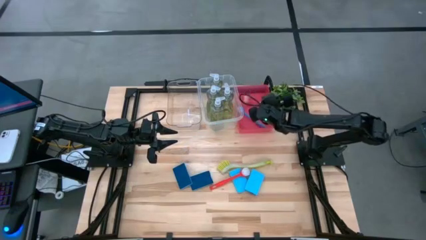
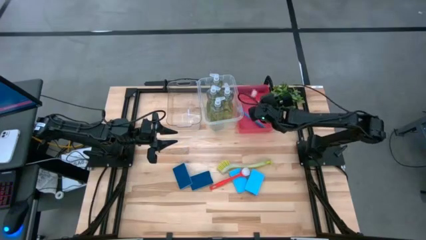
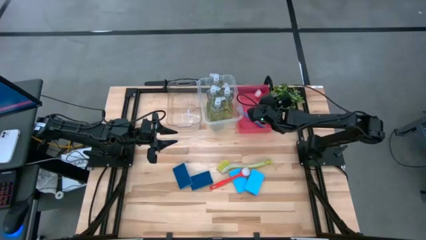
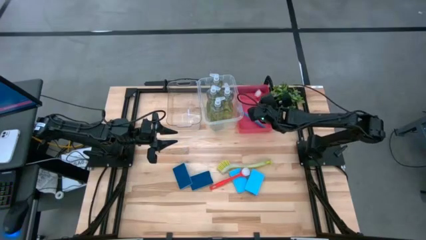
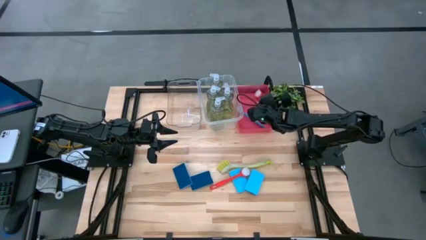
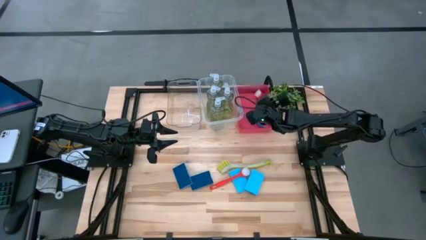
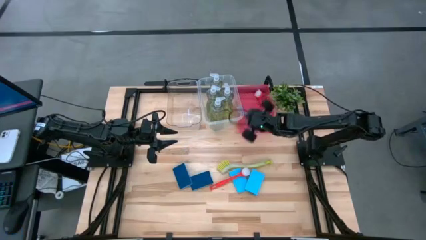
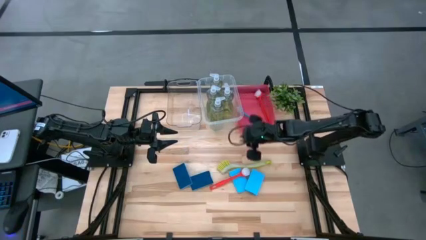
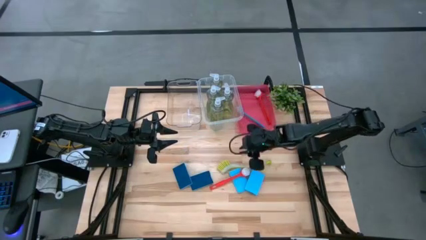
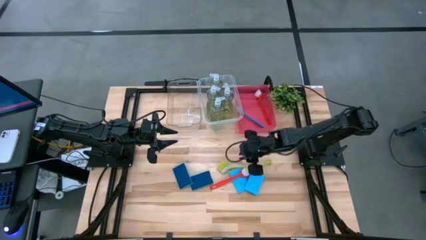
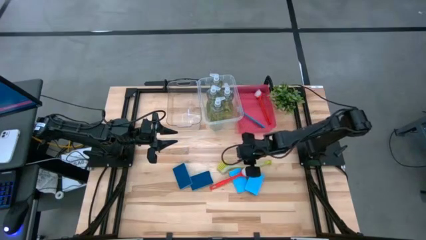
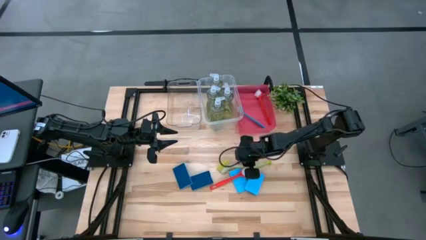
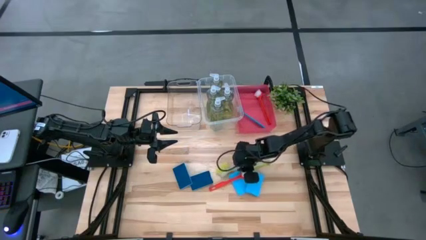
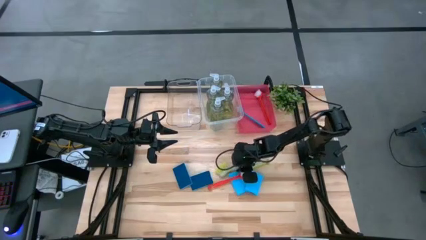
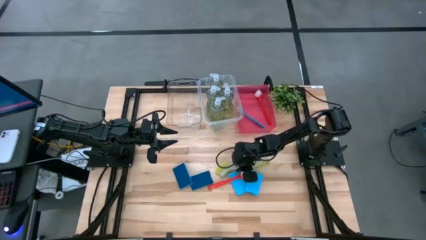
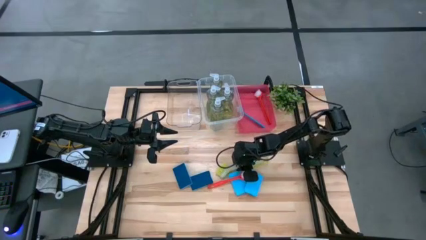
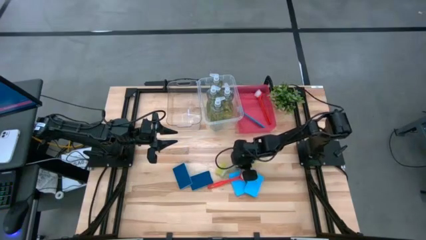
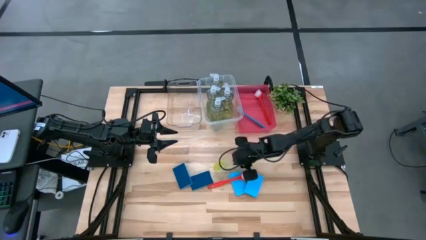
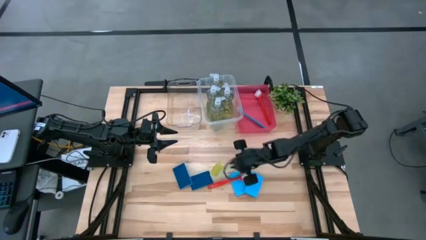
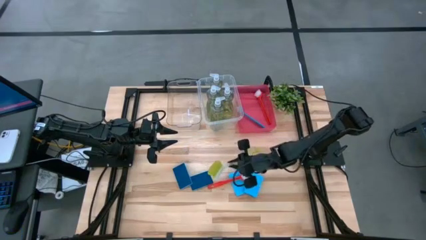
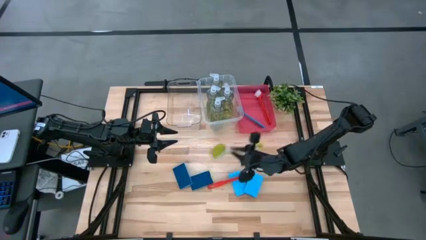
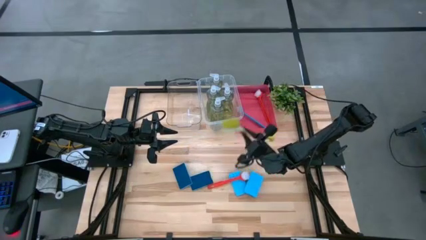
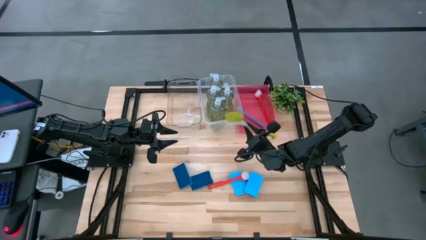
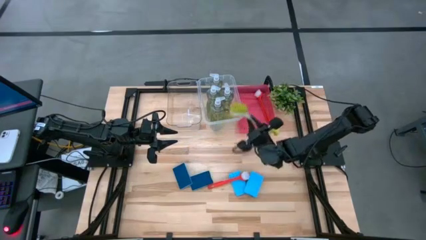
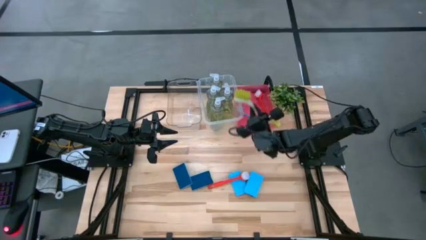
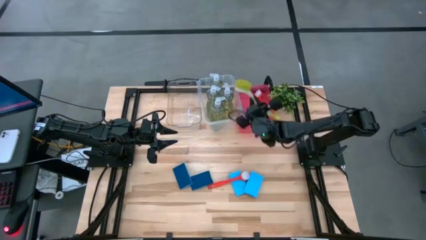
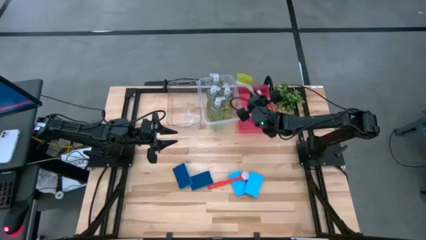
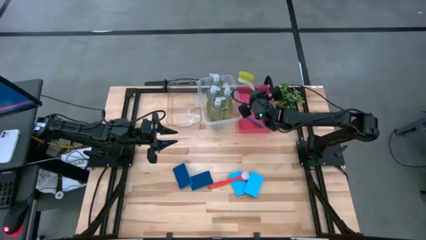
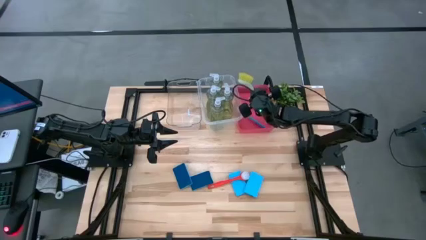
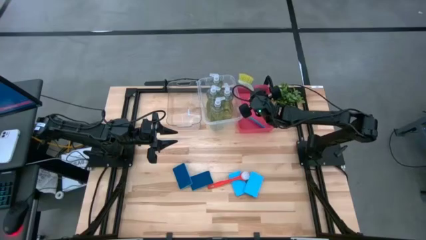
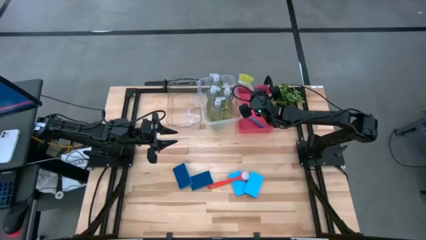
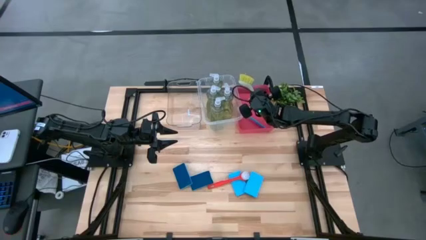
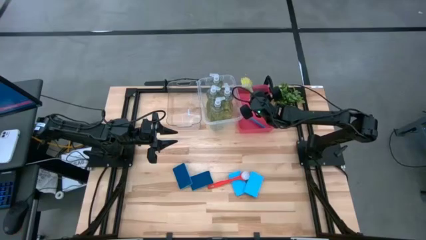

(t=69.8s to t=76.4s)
Task: Pick & Place Kitchen Sink Supplies
Put the green dish brush into the pink bin

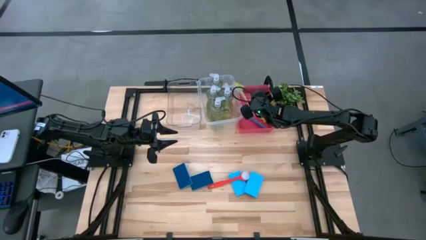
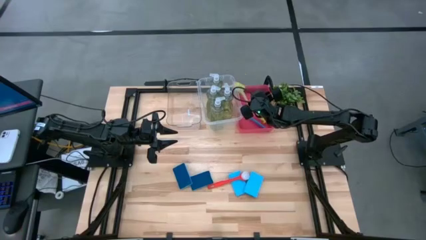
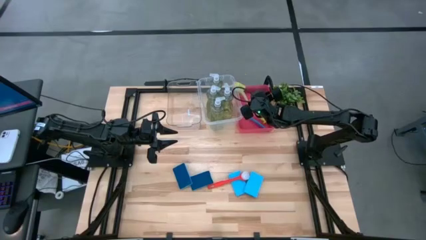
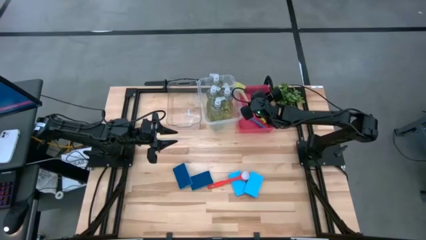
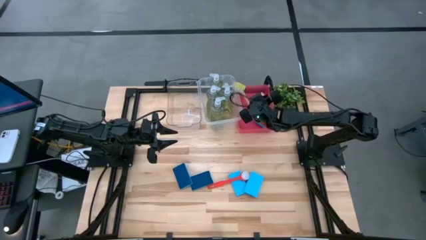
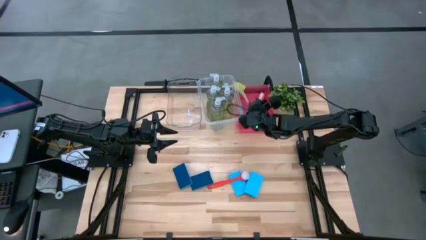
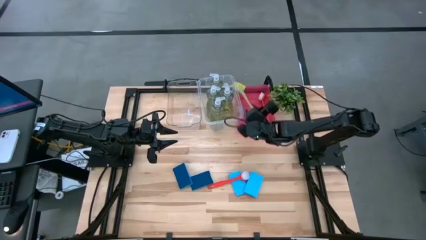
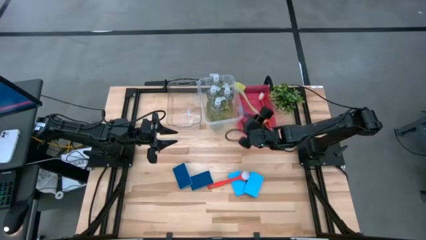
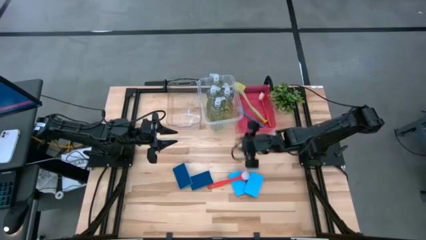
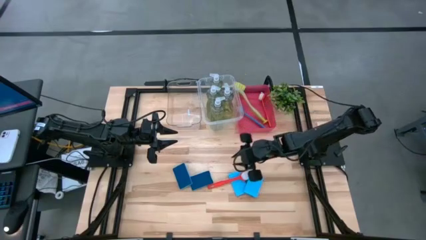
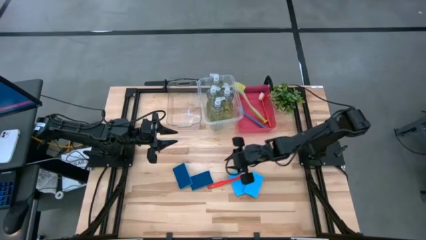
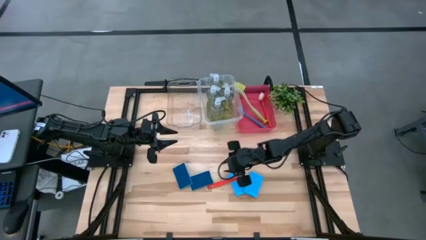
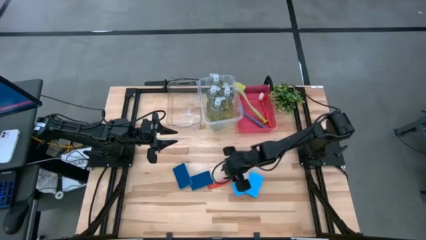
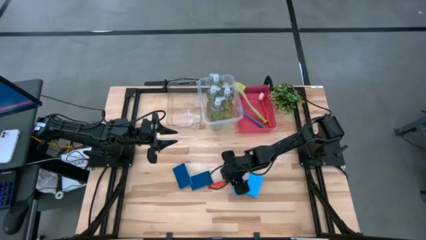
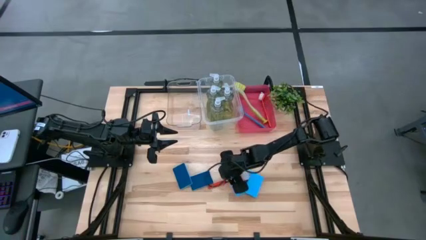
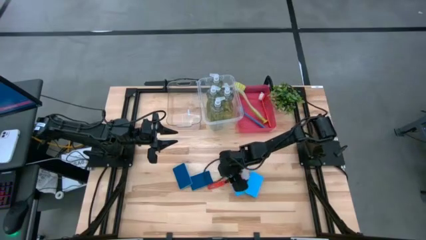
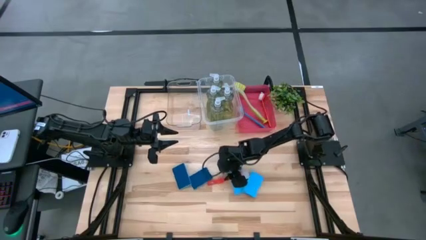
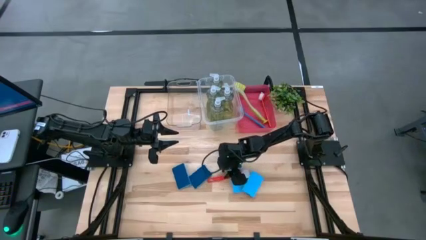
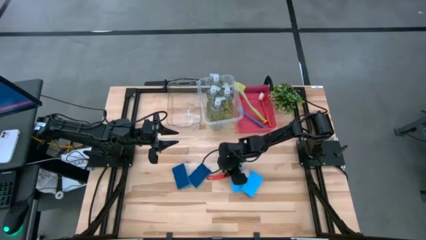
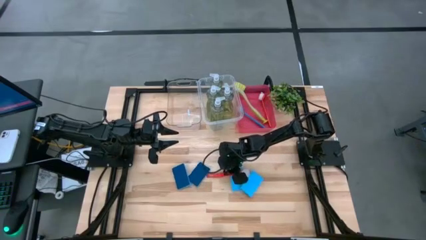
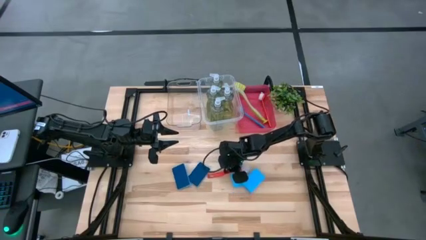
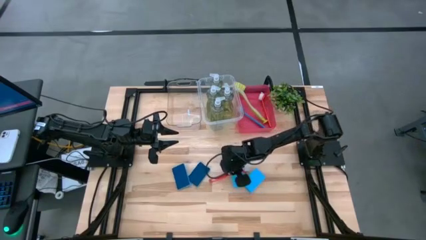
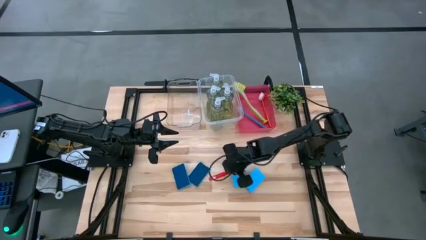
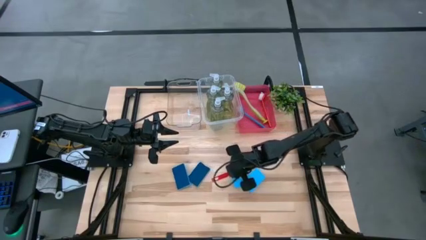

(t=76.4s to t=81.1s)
Put the orange dish brush into the pink bin

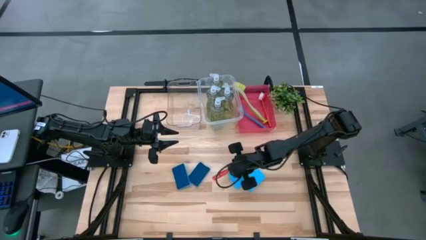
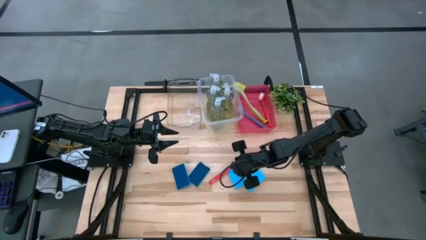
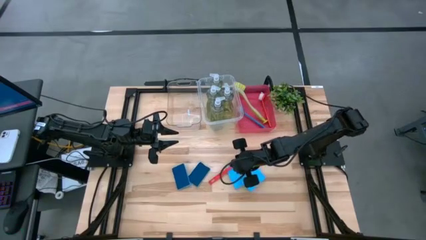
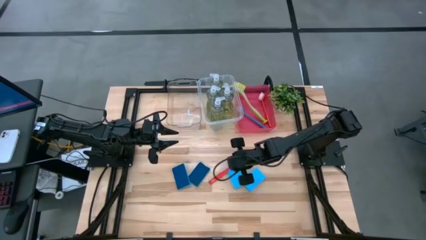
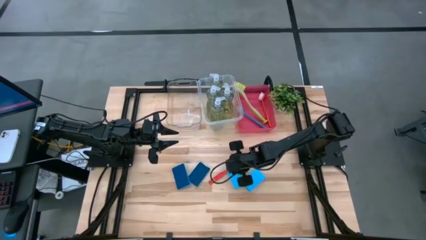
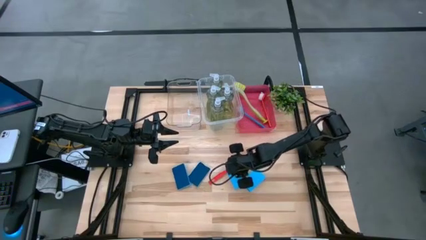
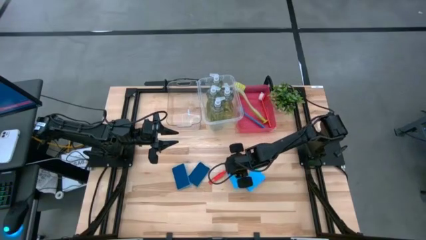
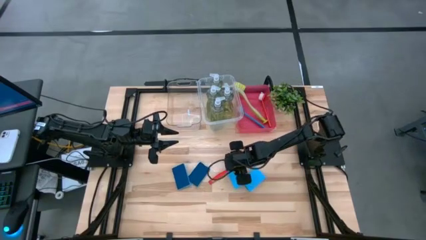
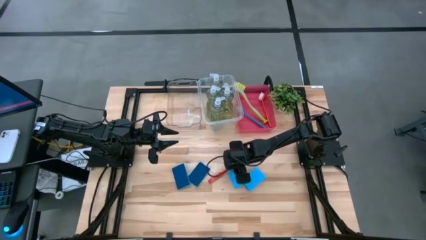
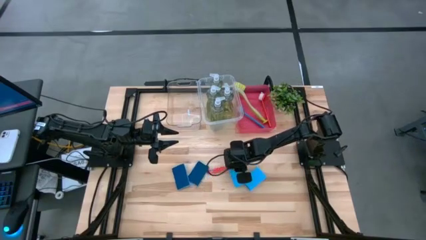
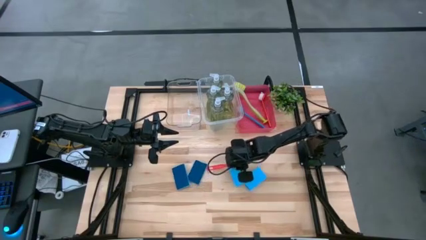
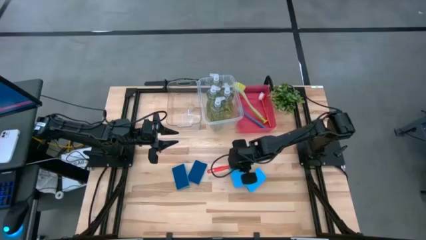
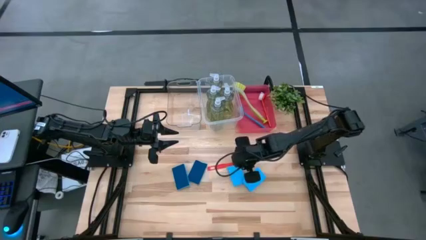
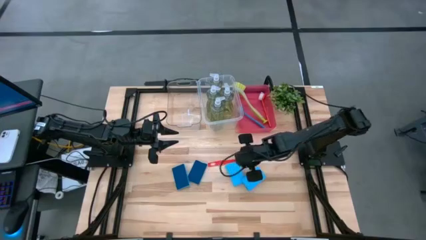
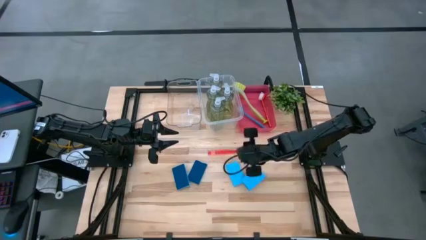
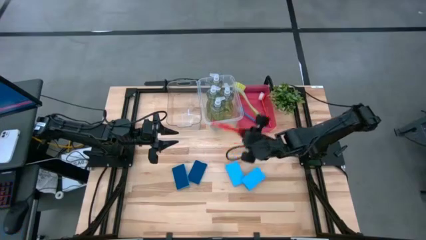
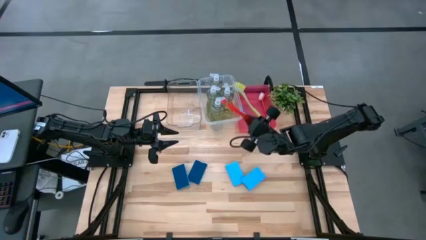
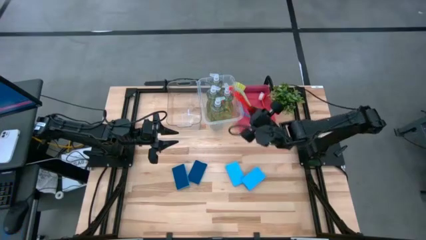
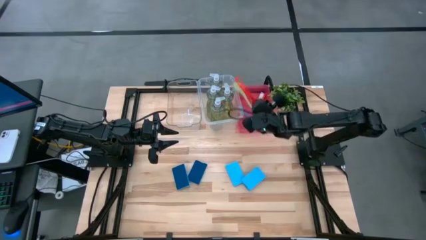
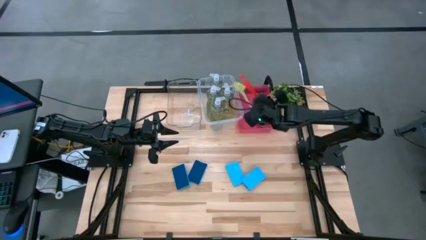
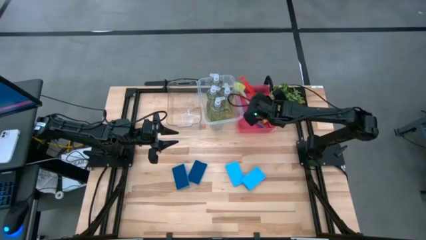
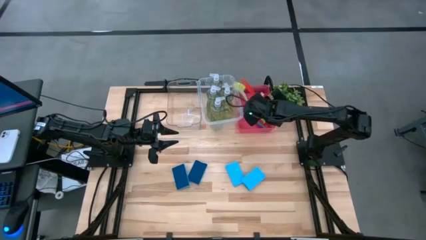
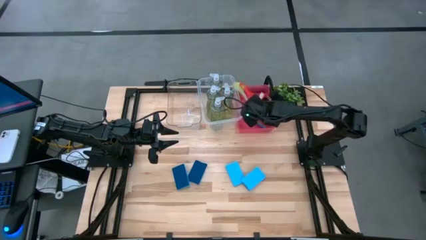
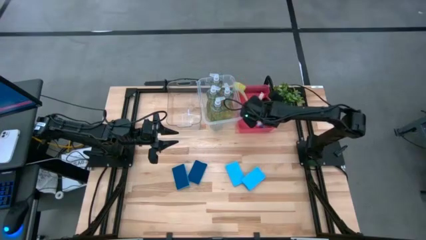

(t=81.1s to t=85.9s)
Put the orange dish brush into the pink bin
